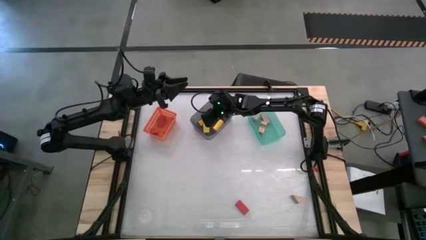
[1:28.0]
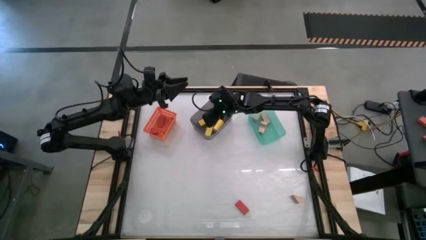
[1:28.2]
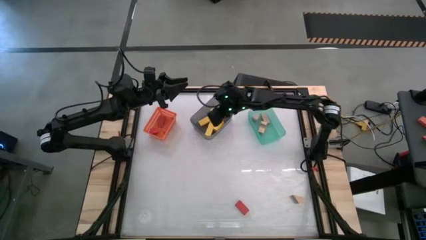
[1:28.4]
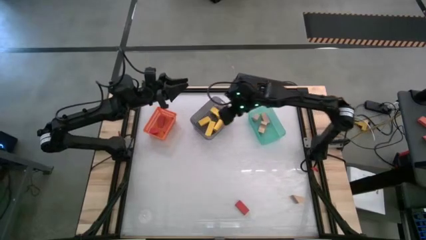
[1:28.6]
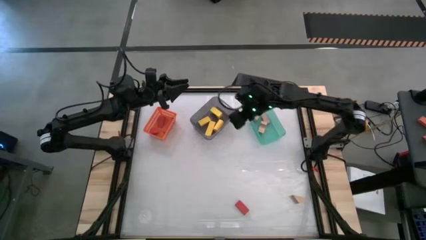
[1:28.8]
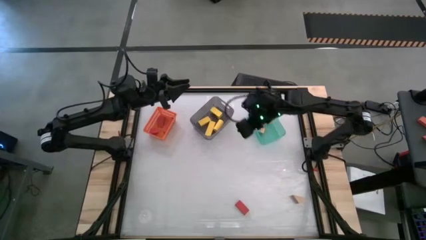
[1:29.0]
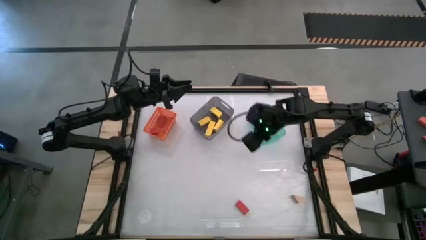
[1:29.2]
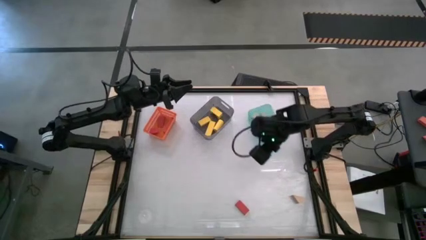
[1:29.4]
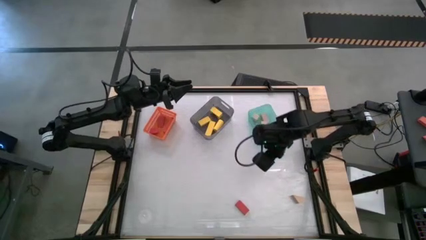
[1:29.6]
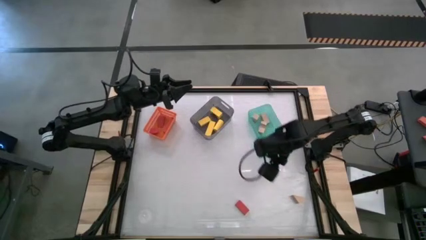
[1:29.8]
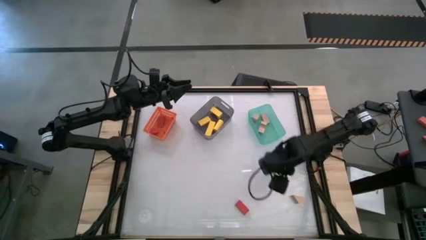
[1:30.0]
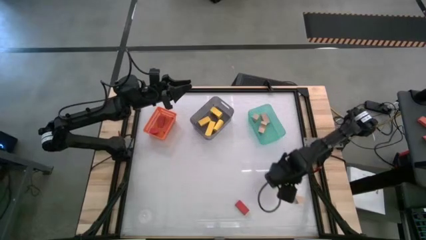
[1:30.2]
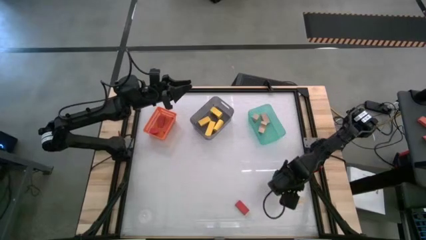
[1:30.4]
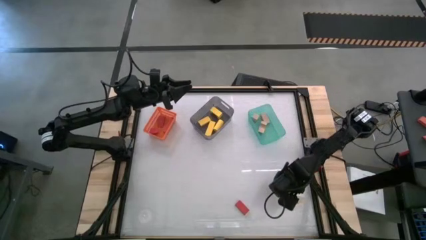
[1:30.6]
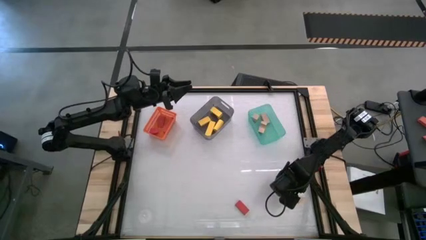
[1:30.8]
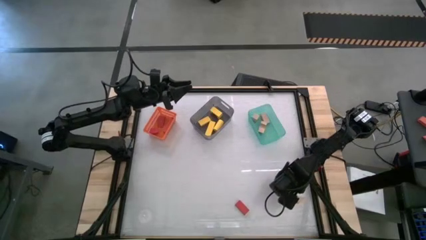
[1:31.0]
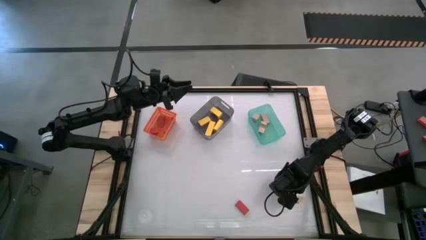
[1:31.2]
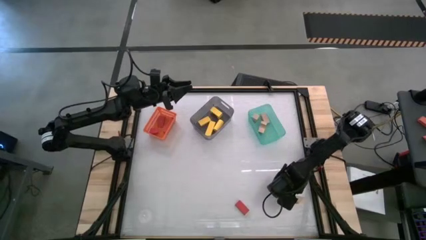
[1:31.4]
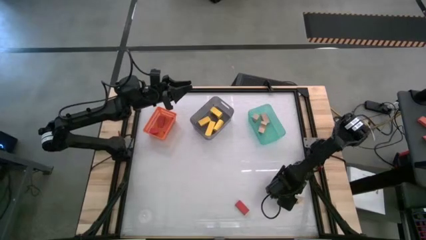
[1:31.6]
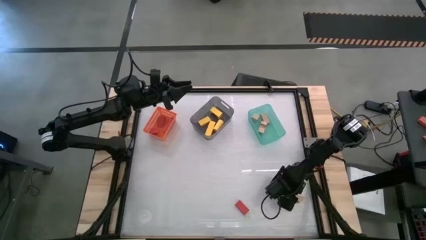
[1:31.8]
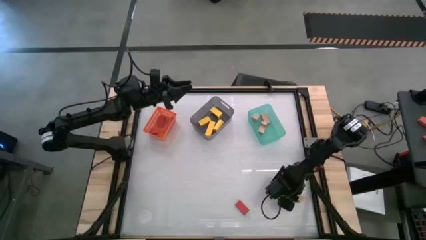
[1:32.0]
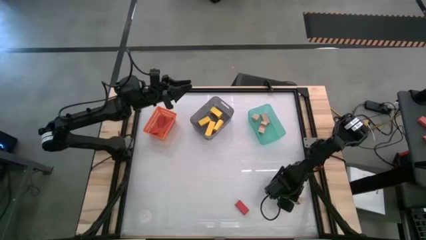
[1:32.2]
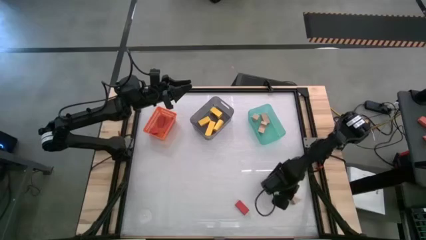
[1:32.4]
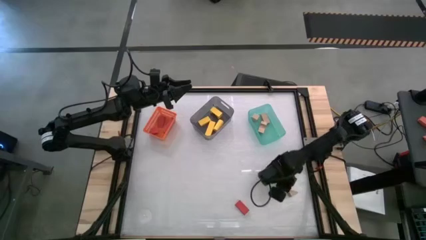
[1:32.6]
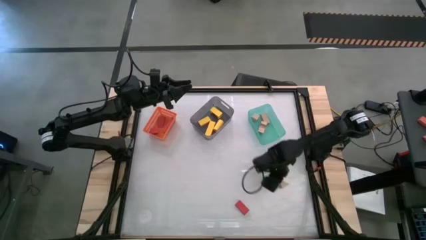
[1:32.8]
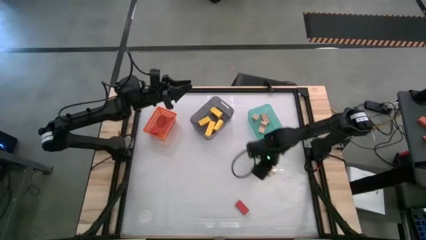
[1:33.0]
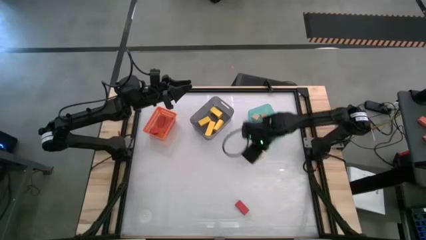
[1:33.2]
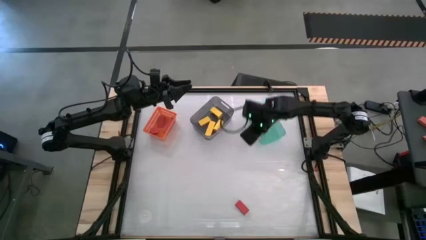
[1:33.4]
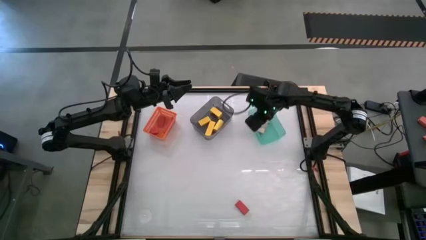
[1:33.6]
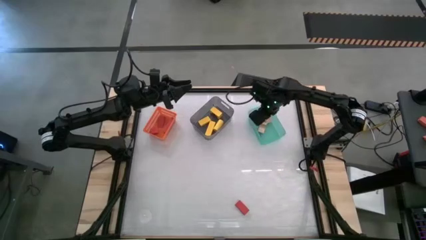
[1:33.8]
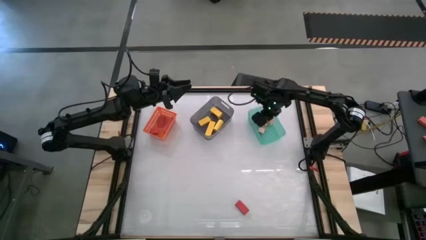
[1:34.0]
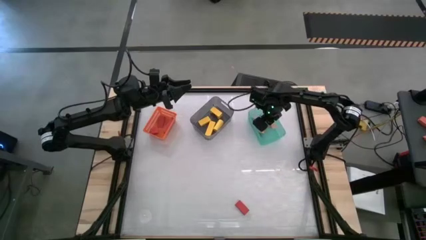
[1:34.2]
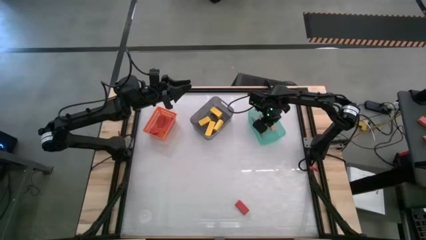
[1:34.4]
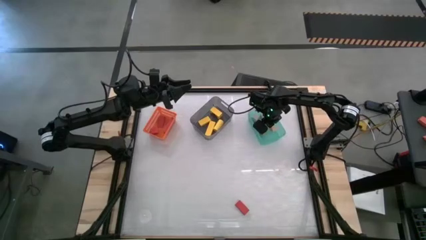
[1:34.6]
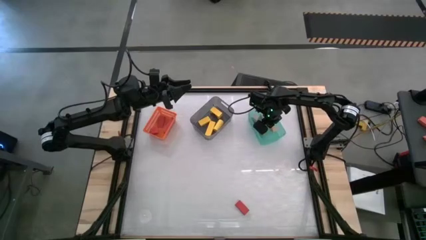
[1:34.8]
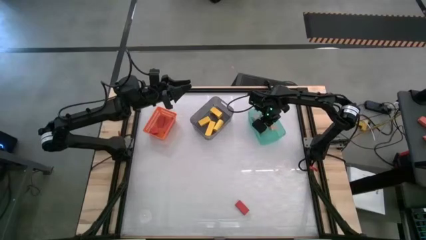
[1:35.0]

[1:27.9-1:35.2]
Task: Sort & place blocks by color
Put the brown block into the blue bin

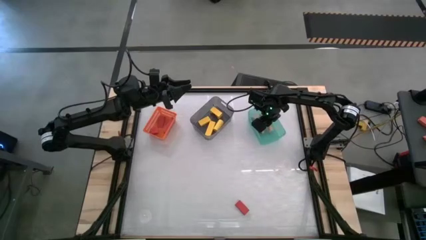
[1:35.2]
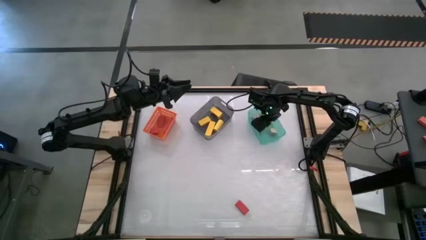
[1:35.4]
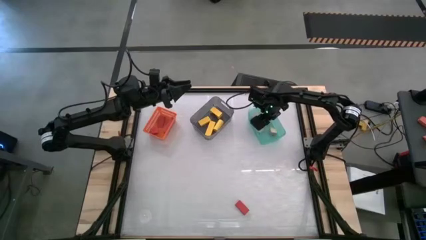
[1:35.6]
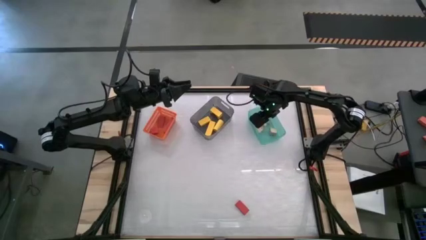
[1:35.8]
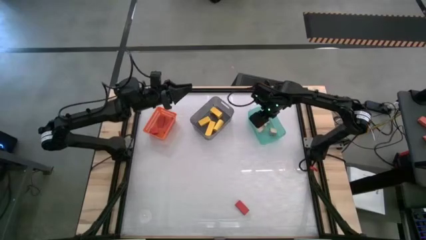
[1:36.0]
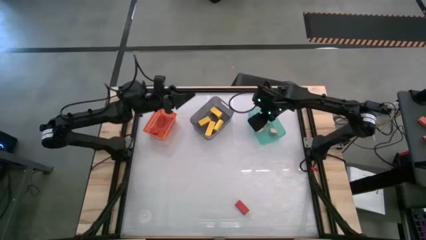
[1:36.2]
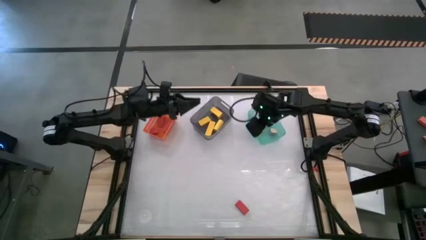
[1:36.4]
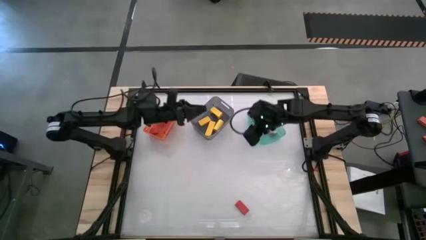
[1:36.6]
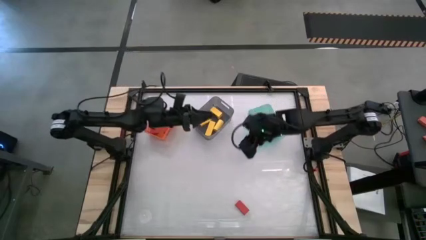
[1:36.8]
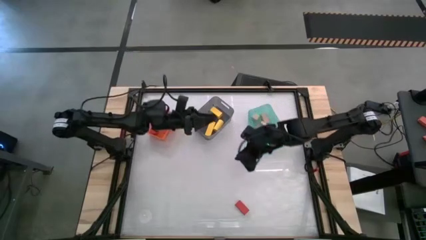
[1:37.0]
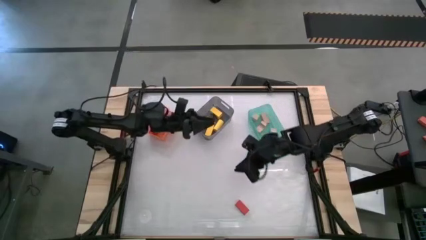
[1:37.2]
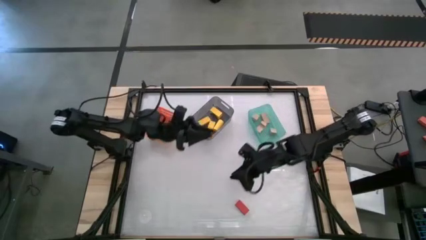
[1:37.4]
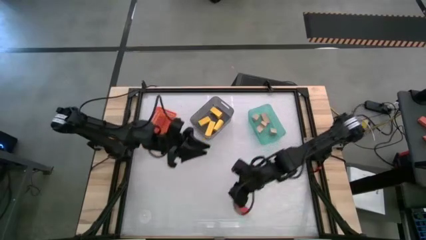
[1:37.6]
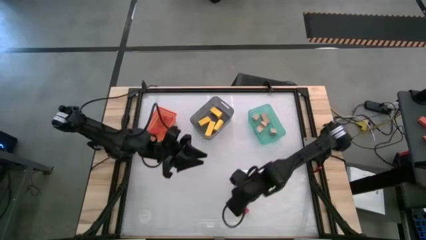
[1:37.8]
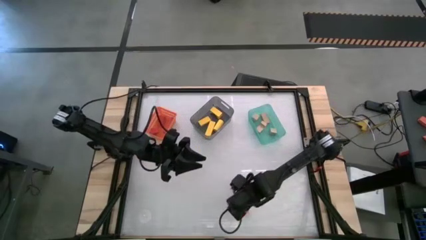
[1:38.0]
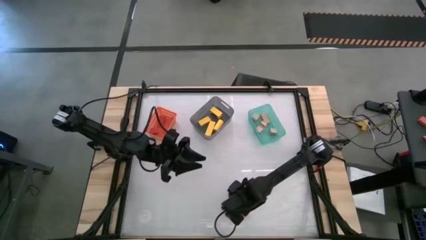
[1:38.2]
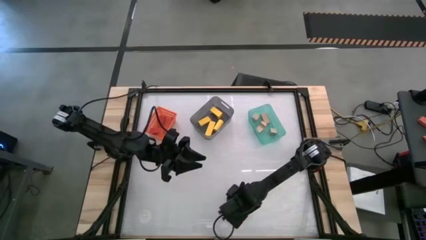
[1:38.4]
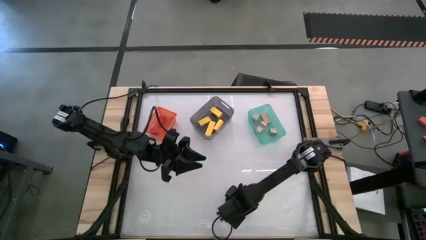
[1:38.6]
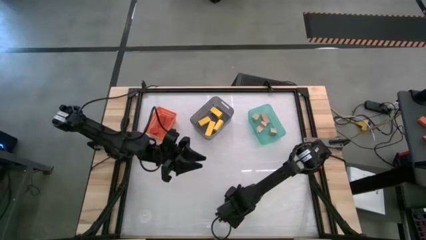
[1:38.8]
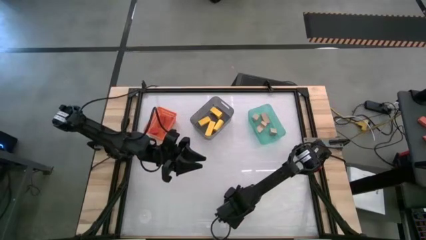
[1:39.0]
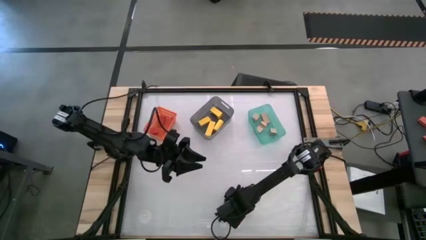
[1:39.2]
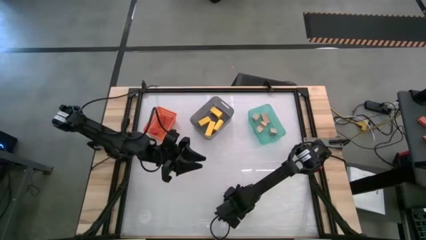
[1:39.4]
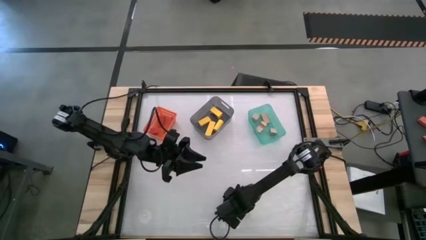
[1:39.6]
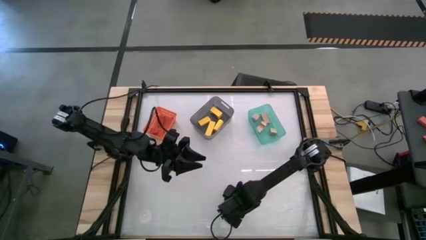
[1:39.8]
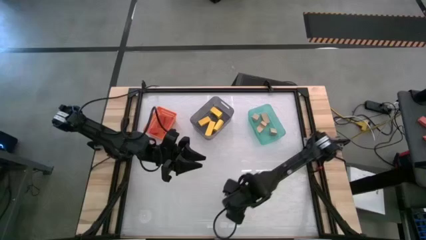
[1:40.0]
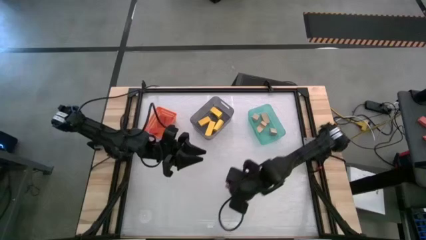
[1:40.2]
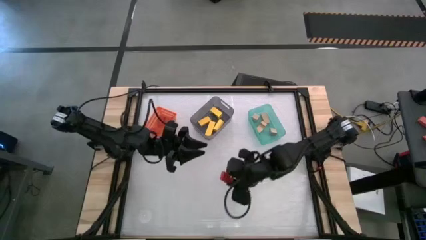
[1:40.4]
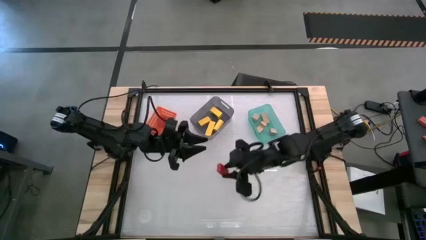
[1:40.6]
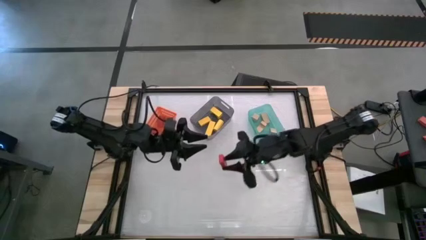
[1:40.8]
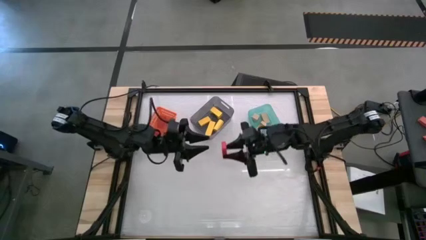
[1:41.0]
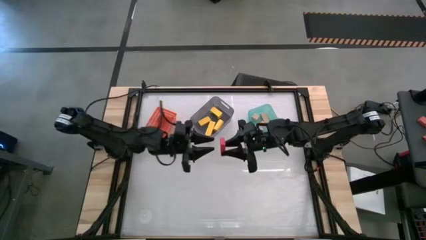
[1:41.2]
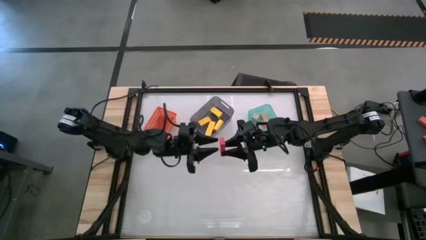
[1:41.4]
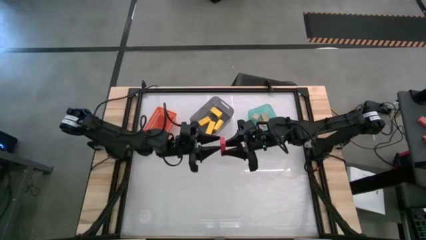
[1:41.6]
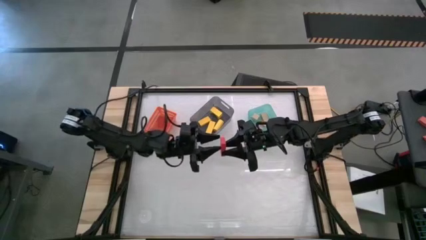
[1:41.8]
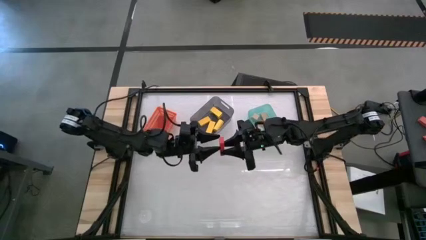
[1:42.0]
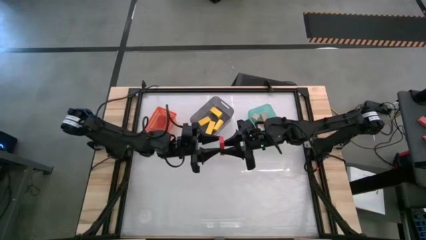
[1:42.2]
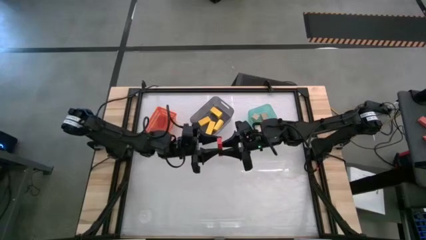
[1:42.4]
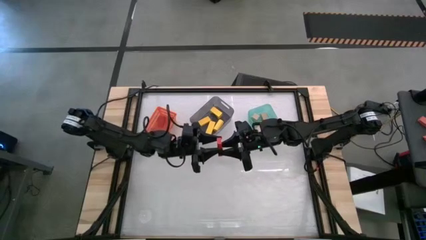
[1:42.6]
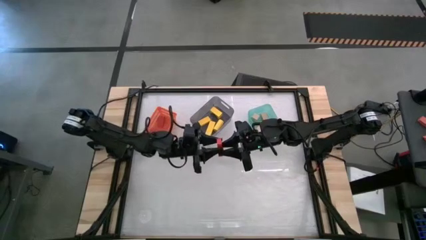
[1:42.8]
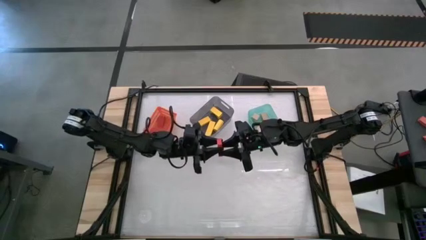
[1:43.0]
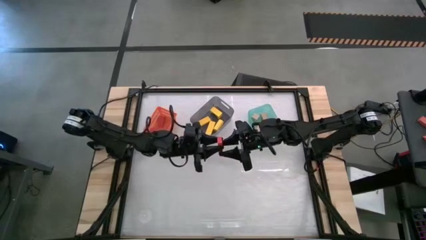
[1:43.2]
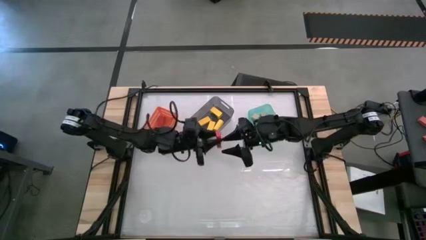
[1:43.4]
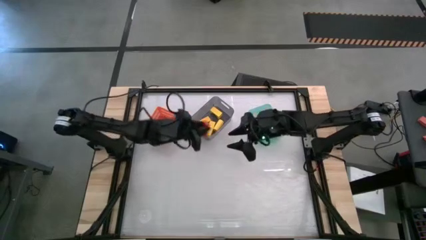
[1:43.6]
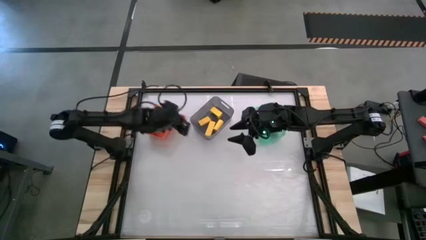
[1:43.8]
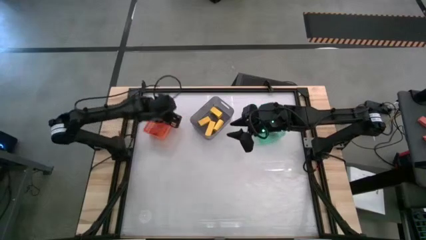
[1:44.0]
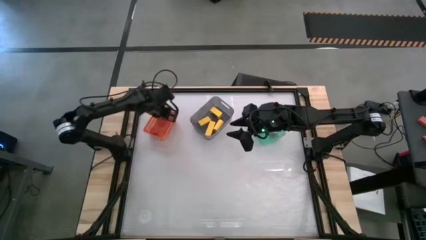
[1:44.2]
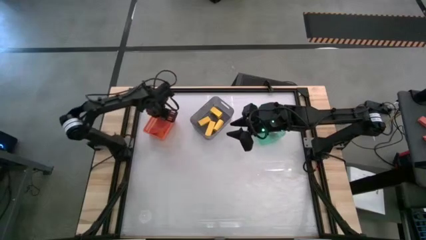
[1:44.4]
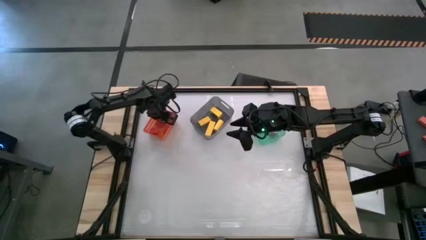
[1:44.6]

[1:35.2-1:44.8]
Put the red block into the orange bin
